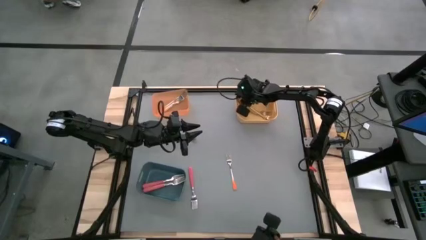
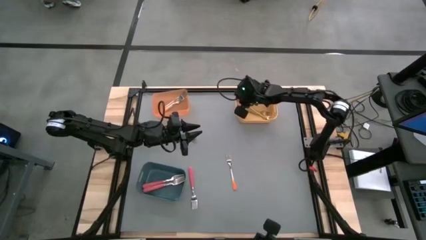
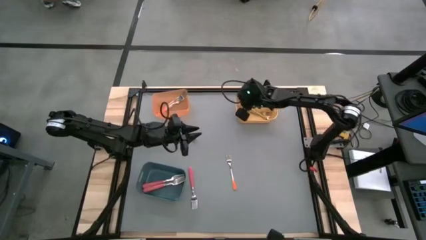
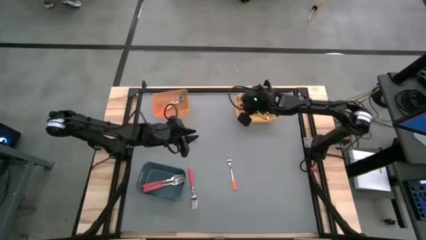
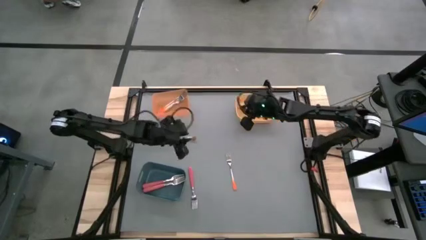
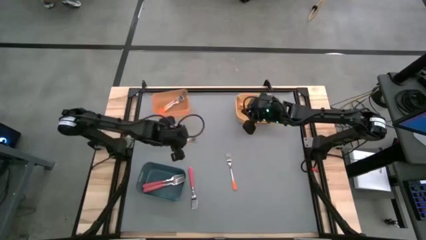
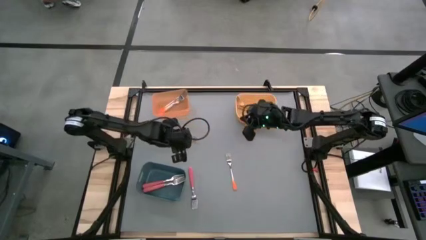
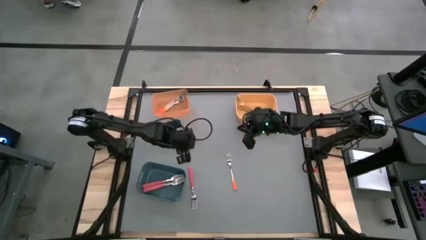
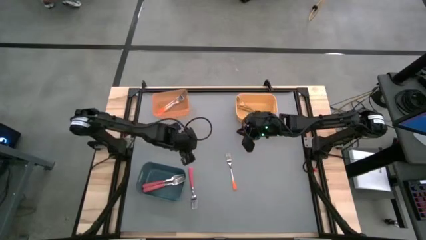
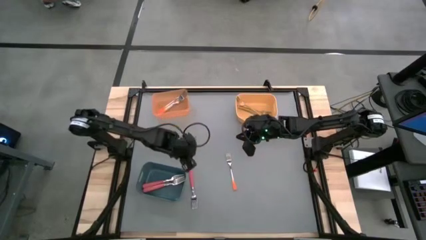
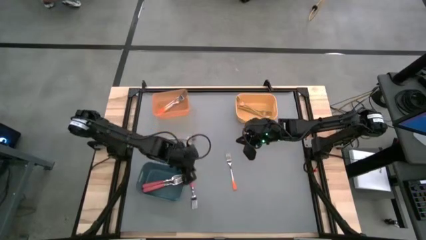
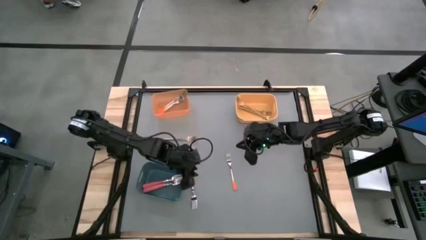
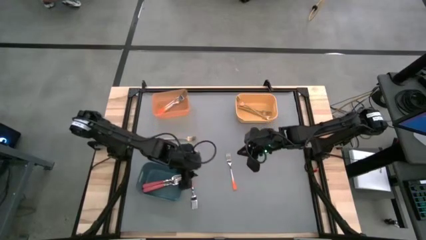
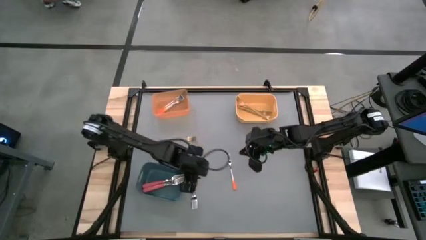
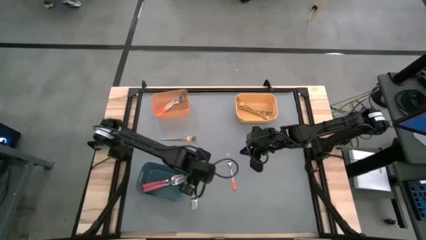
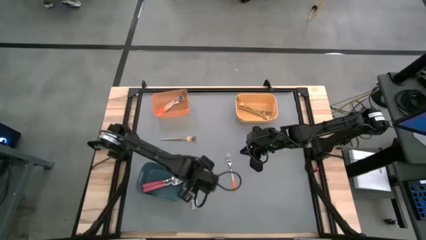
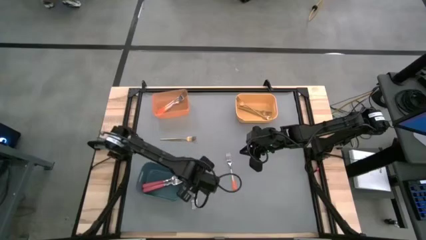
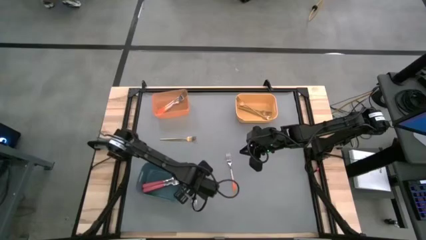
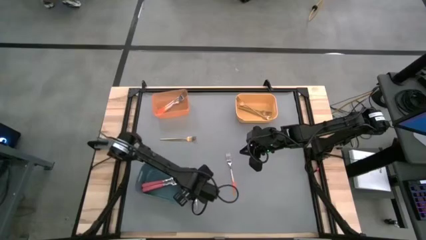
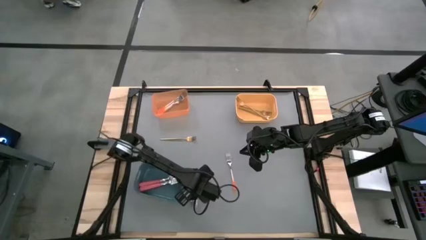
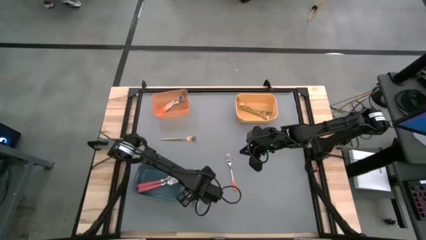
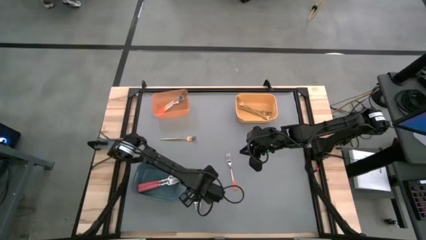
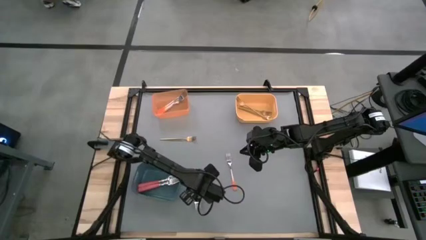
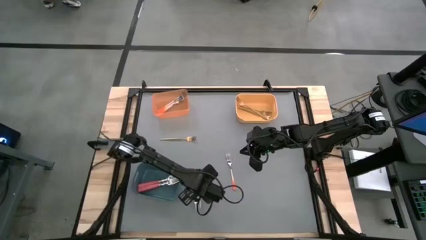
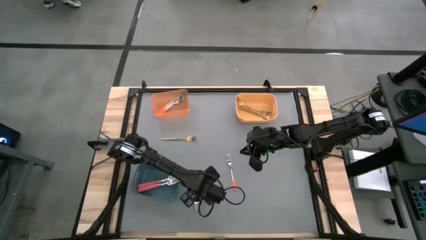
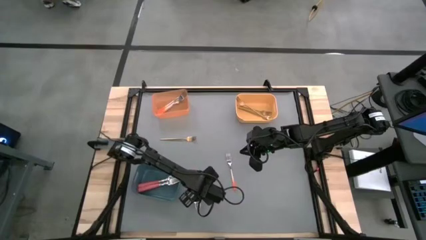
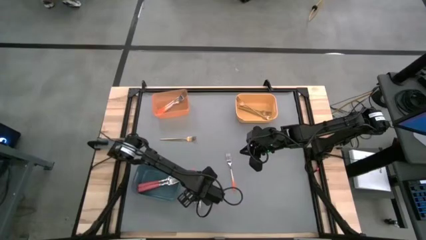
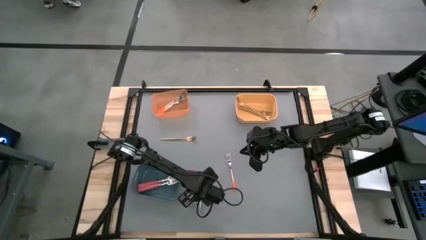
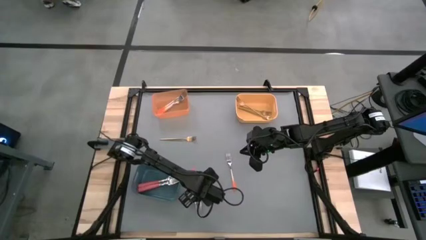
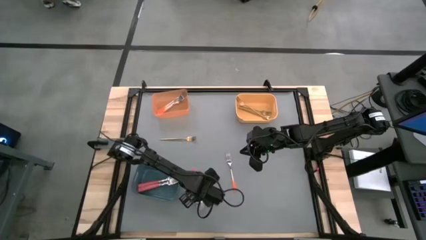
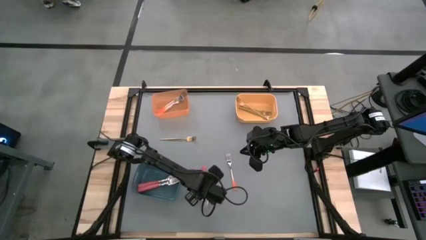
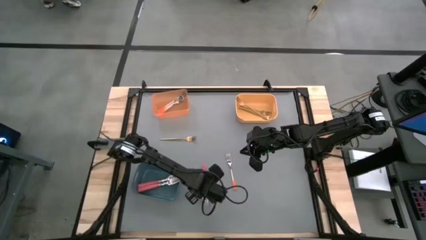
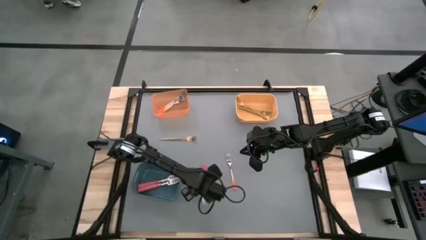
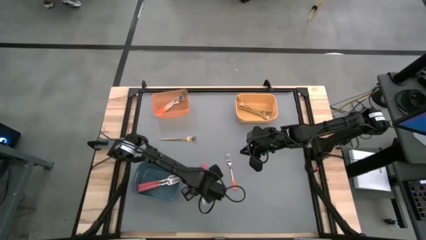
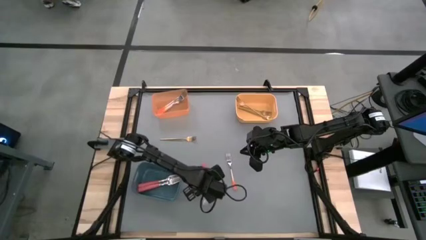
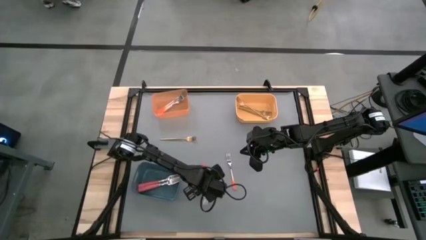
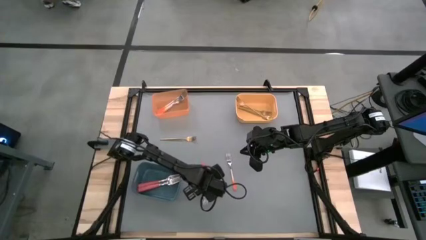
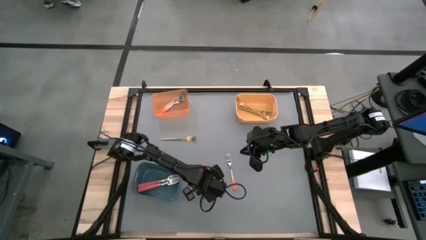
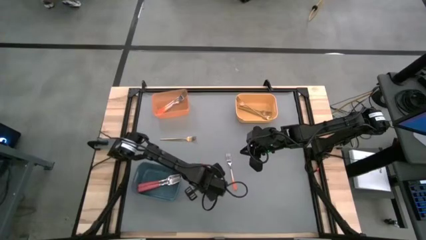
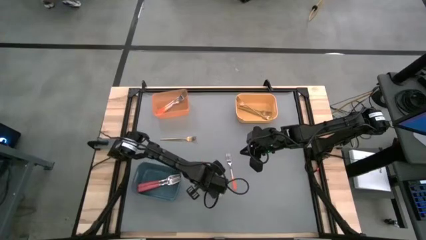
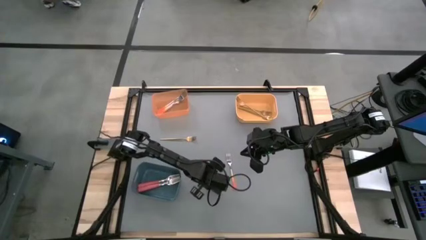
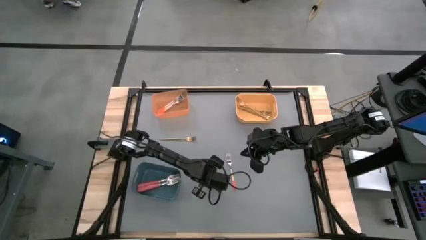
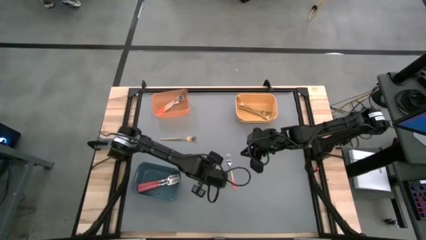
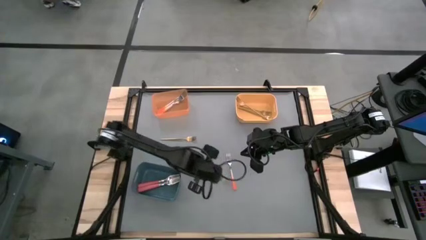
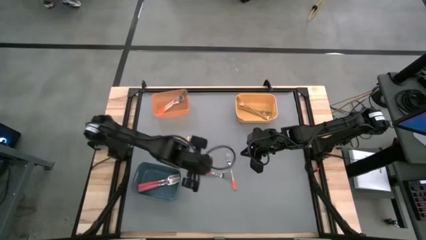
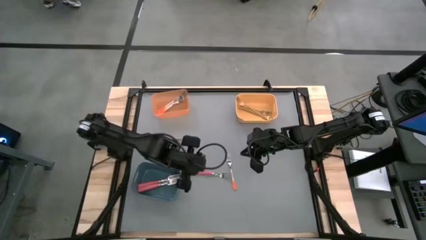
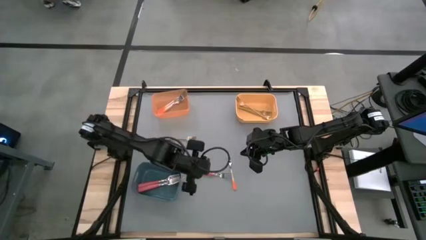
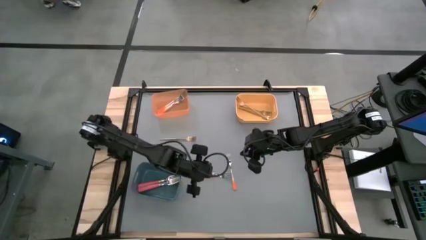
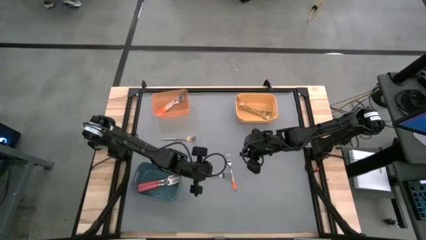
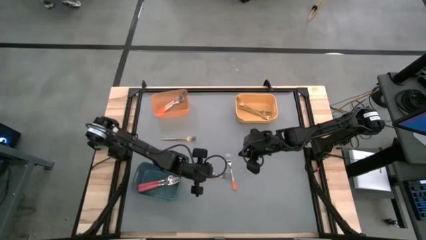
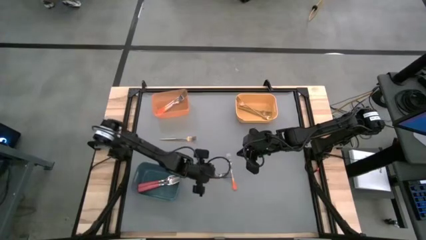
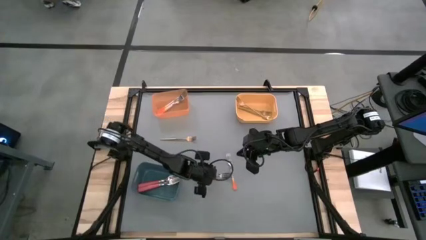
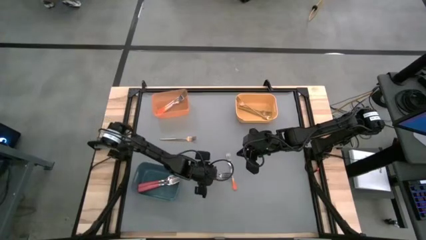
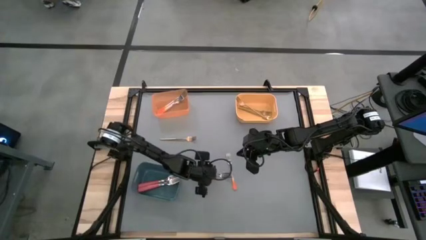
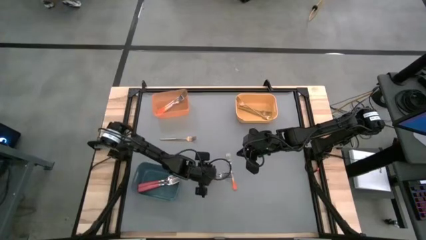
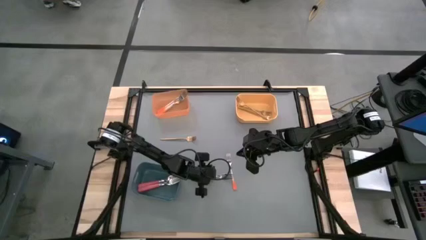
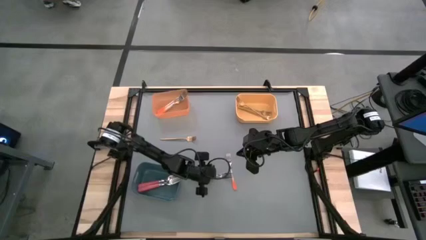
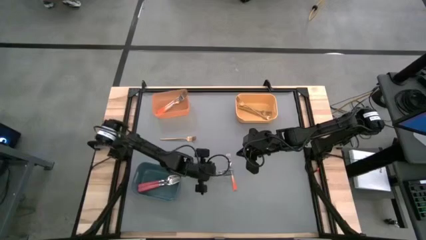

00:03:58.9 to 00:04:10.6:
Task: Sort silverware by color (type)
Put the pink fork into the blue bin
